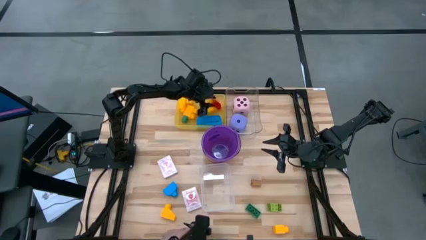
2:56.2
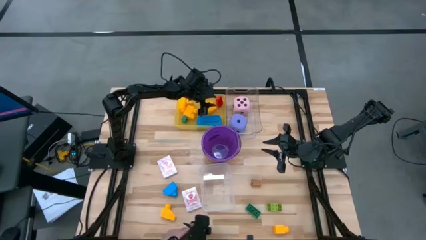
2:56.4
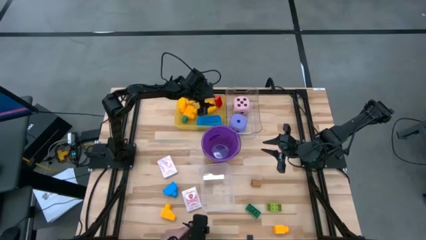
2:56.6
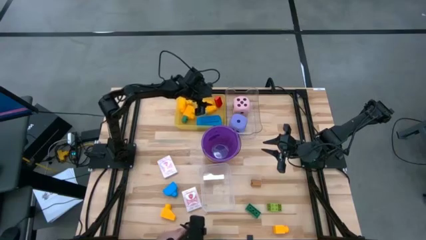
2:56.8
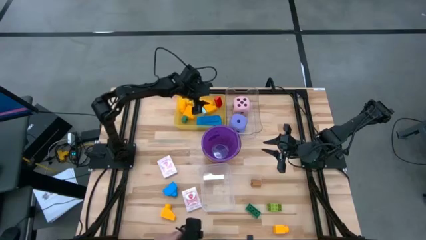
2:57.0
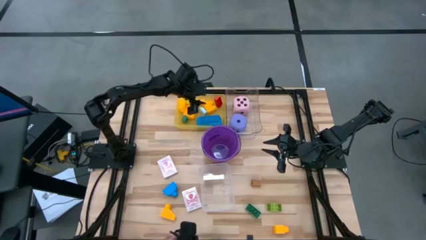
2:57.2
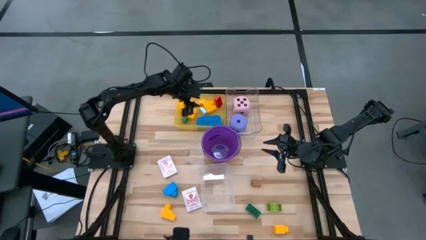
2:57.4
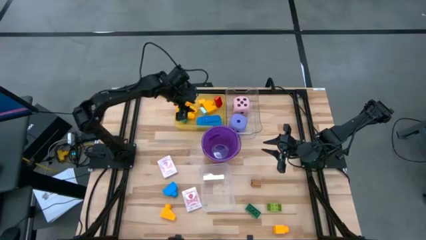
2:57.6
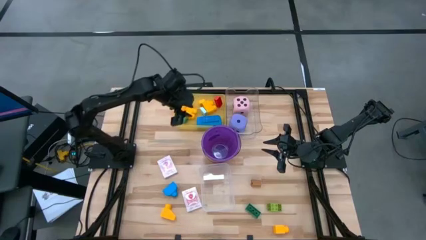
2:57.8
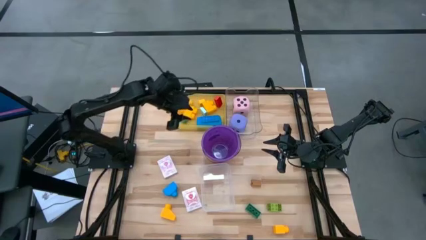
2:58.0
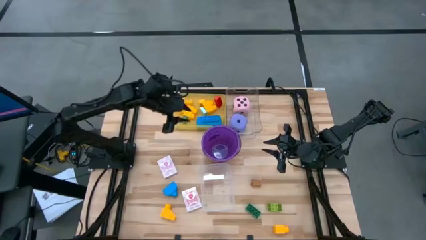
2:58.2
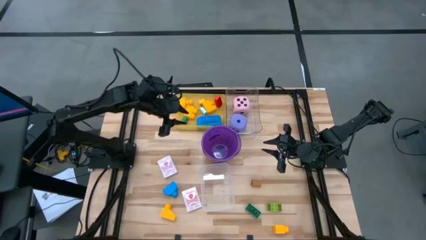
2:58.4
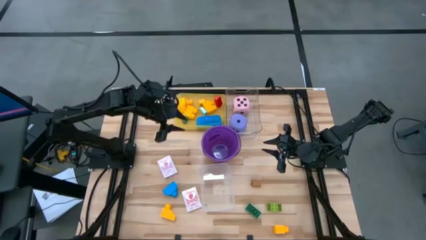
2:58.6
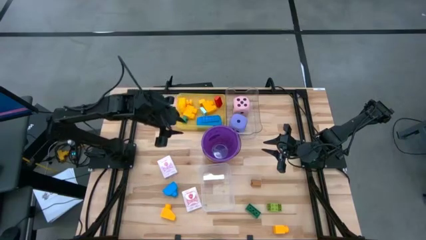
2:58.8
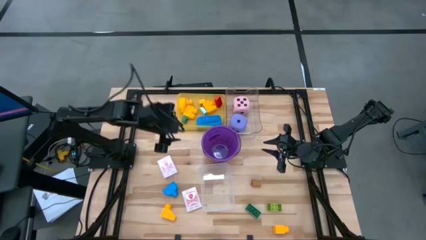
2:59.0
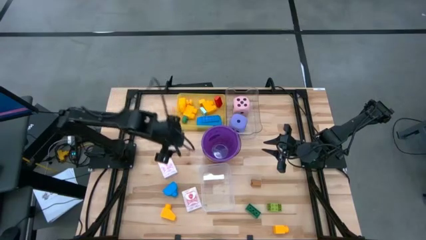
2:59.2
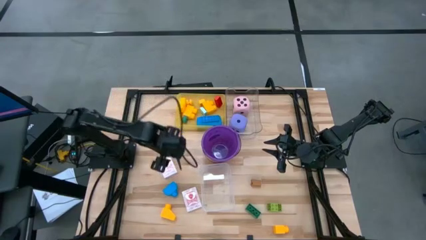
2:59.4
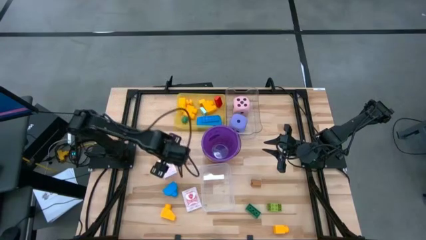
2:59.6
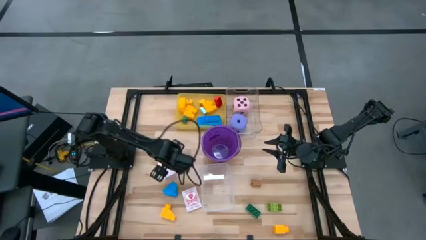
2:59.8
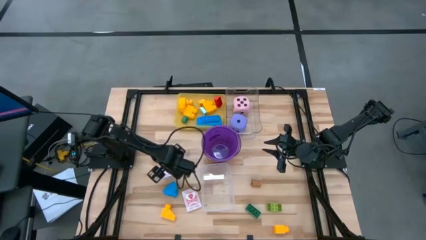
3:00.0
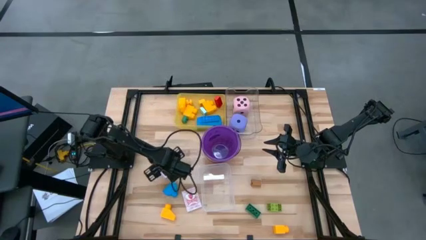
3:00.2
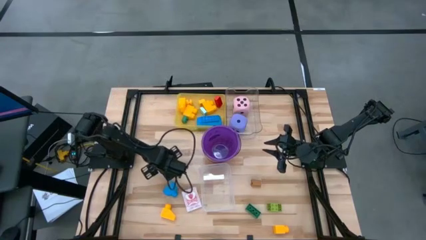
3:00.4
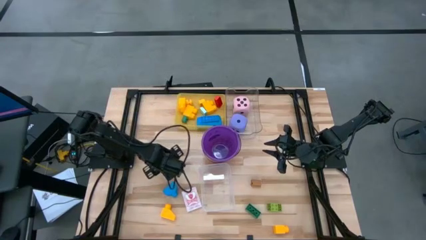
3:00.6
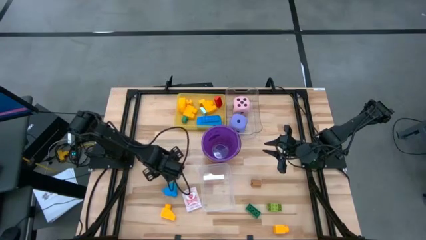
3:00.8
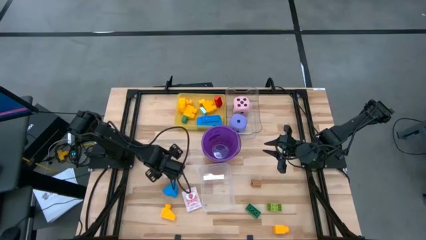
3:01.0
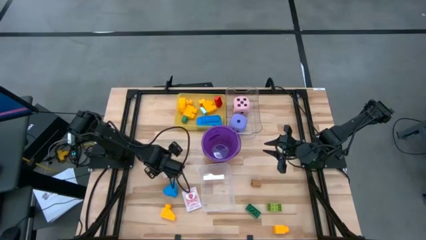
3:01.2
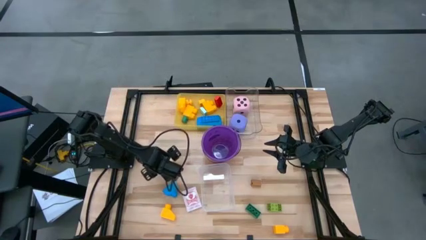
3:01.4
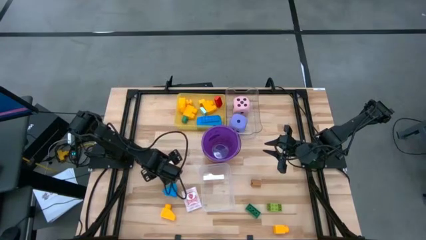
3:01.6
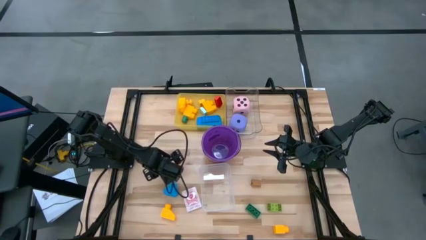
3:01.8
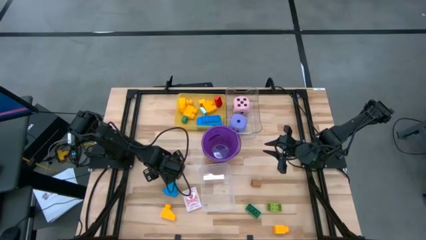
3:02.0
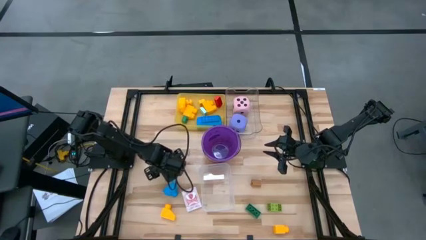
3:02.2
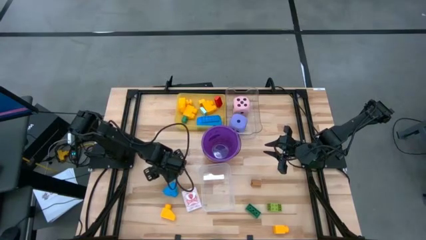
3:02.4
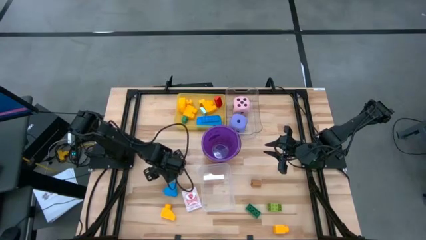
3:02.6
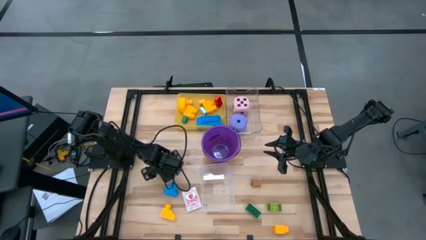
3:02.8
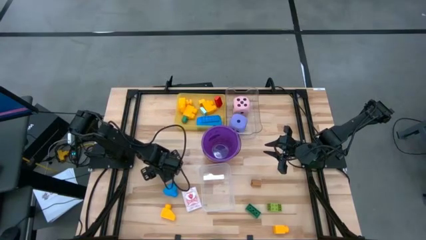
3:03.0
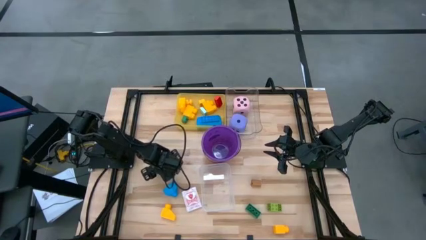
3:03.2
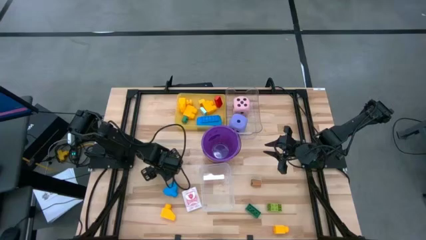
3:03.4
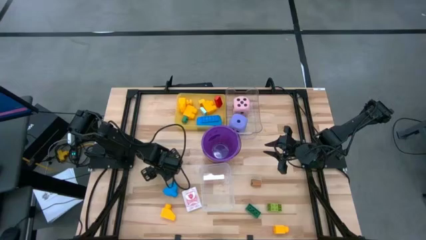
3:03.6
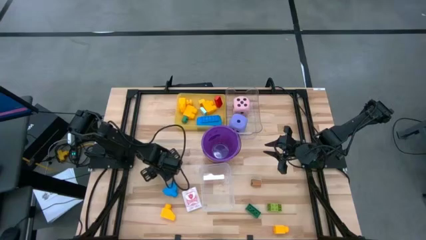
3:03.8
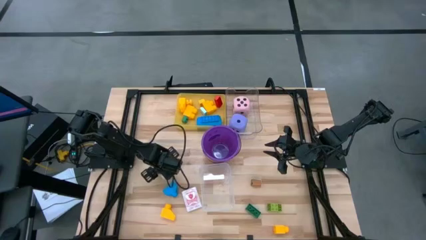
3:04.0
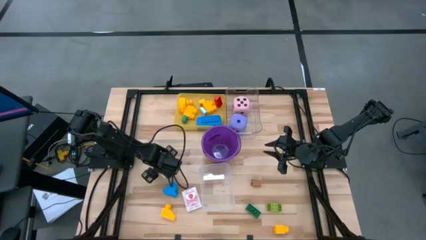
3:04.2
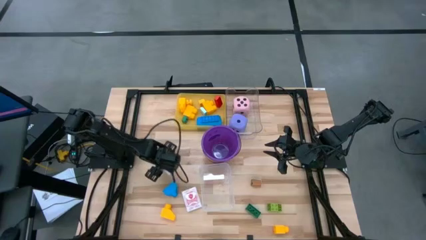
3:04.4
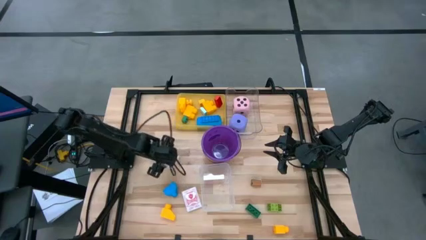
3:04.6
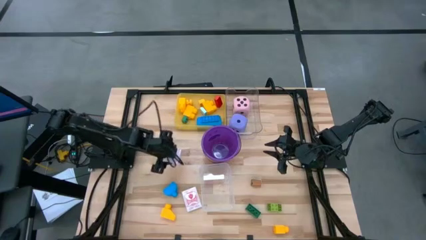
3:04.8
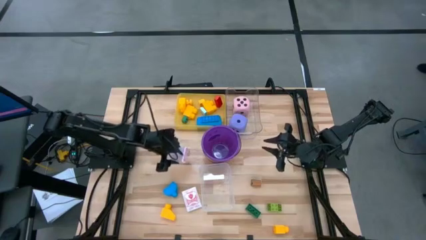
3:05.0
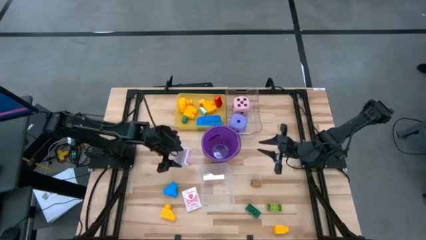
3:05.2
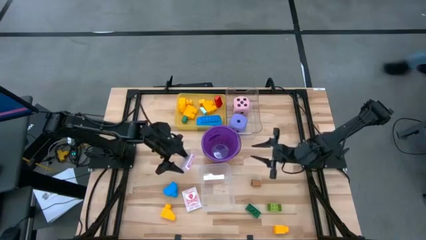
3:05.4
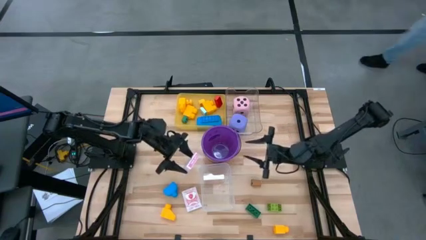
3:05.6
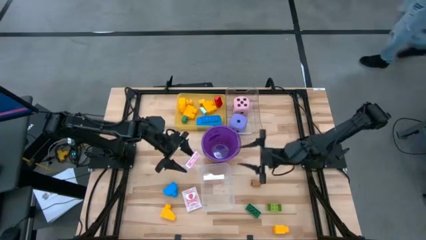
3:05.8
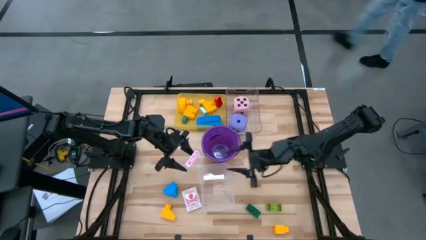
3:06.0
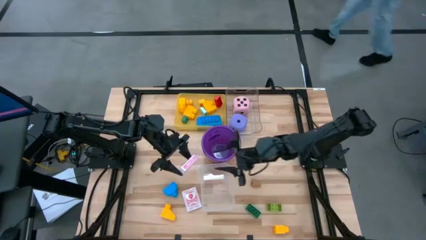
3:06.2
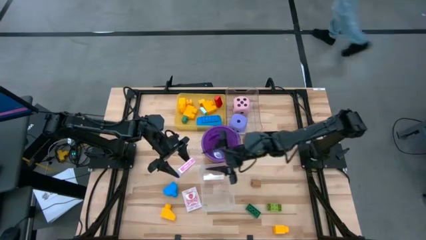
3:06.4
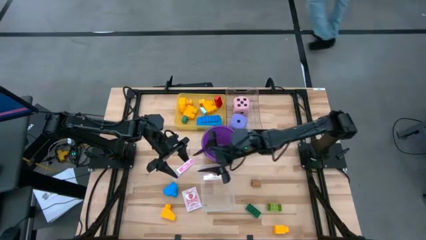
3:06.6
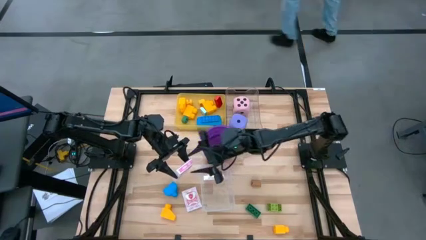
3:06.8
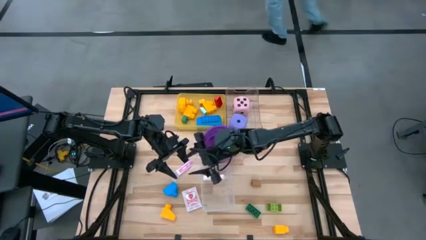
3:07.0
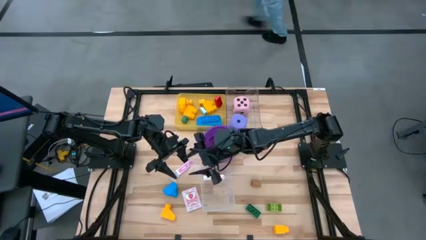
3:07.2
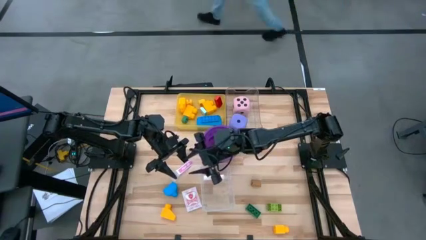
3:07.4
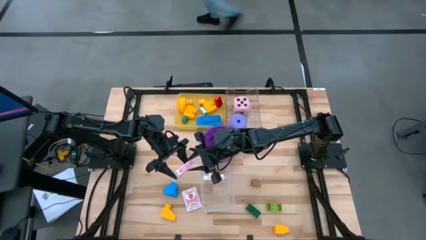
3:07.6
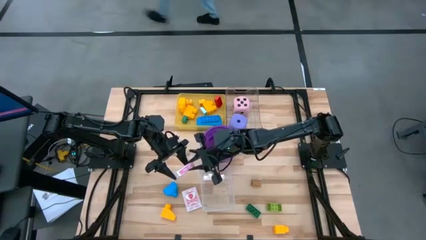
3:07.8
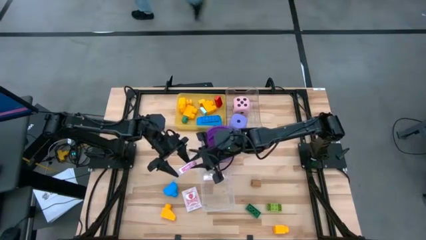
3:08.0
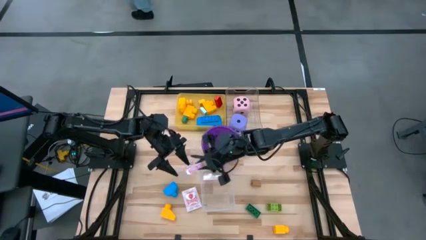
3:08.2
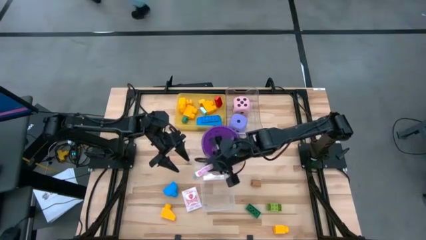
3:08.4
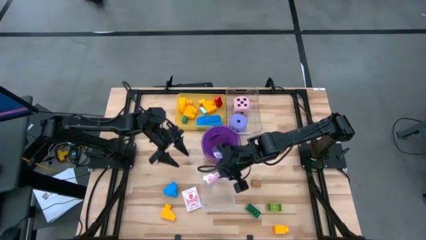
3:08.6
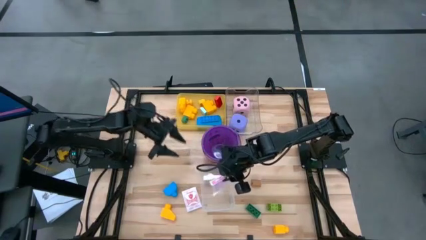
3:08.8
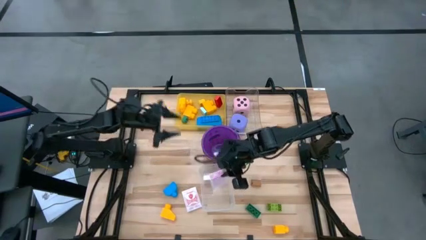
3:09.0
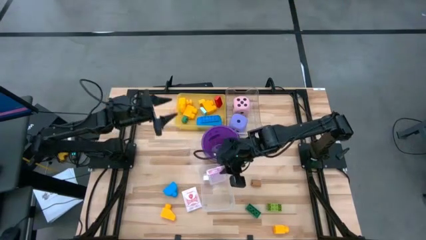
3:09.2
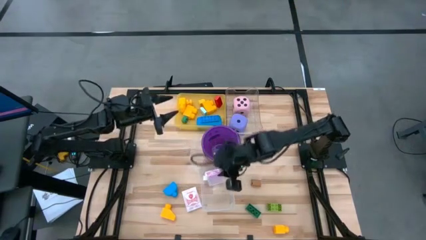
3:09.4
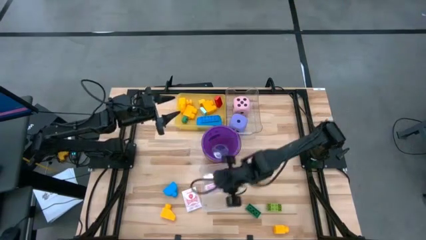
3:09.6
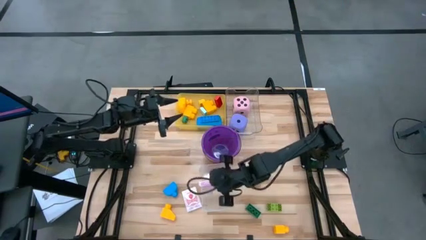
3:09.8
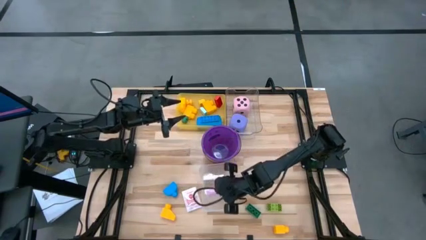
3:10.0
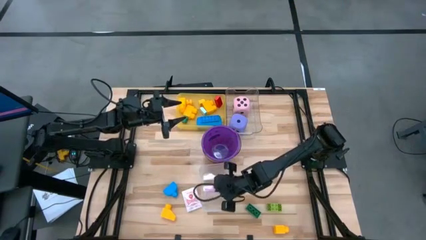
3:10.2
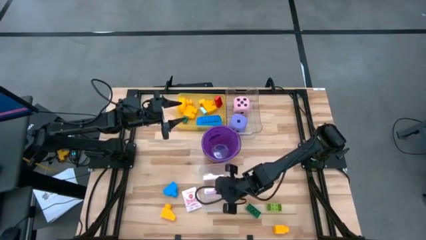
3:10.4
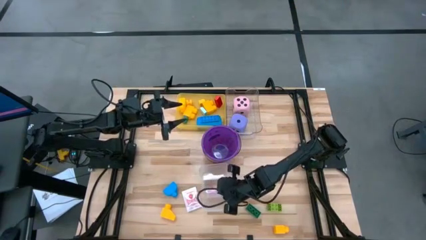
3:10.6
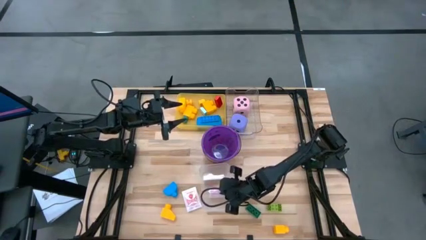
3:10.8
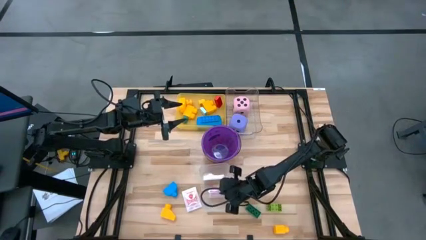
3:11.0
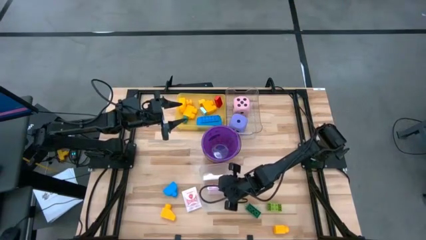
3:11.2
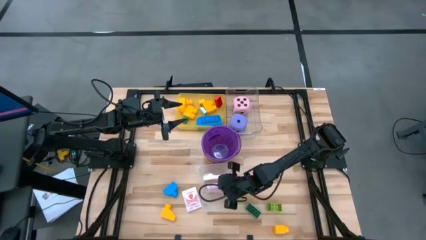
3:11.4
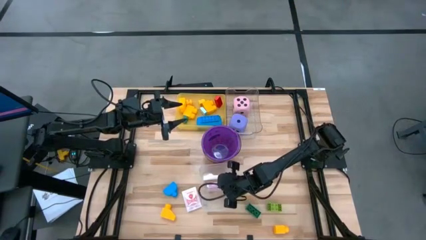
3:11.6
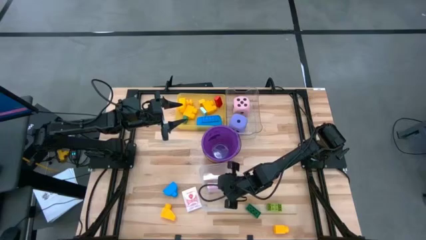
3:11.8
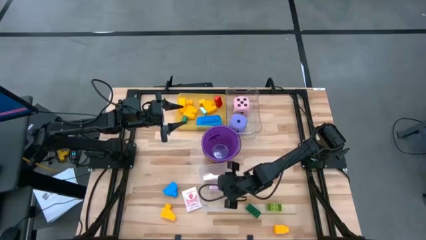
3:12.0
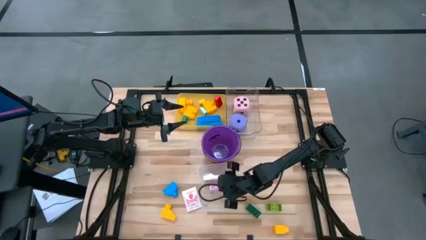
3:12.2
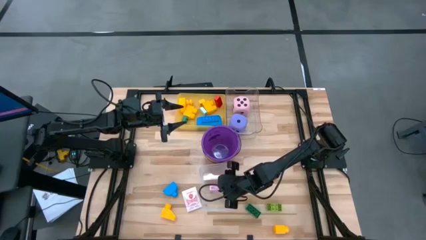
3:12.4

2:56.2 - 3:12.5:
Task: Pick & Place Toys
Put the pink deck of cards into the bottom transparent bin

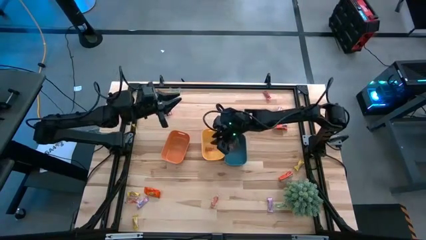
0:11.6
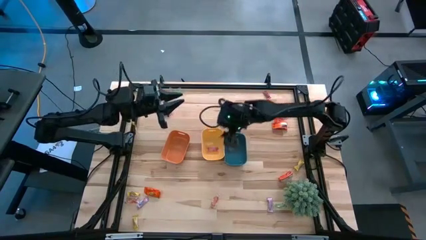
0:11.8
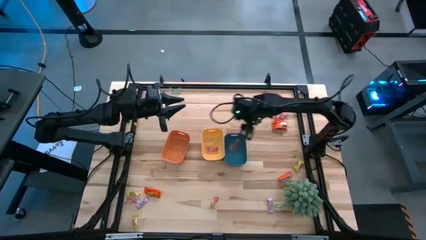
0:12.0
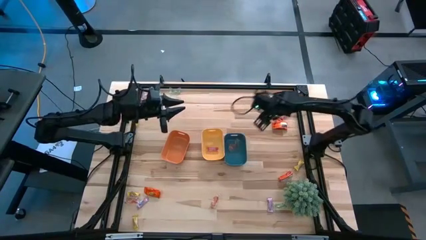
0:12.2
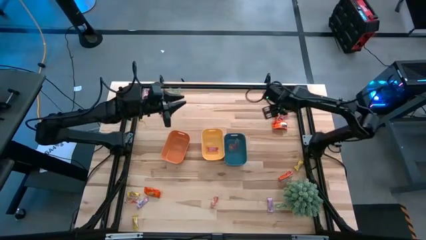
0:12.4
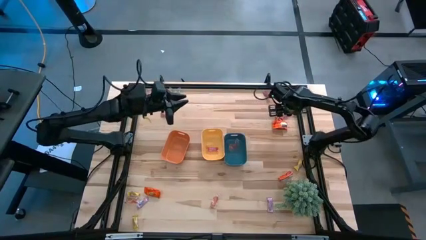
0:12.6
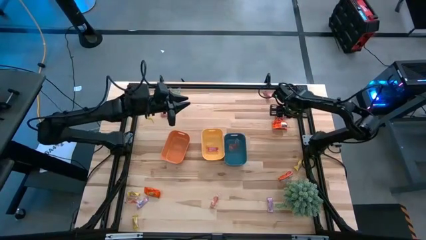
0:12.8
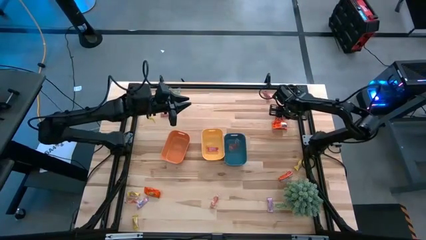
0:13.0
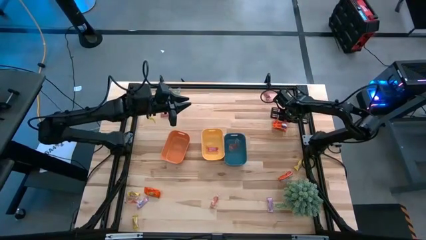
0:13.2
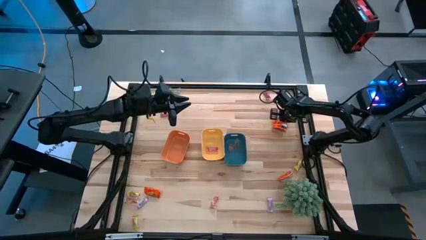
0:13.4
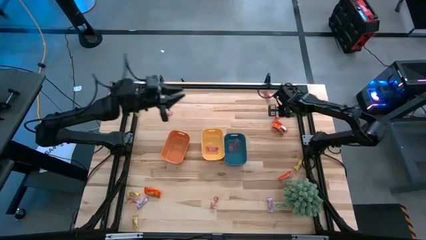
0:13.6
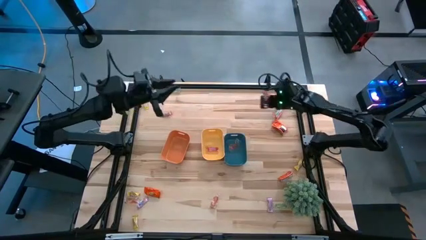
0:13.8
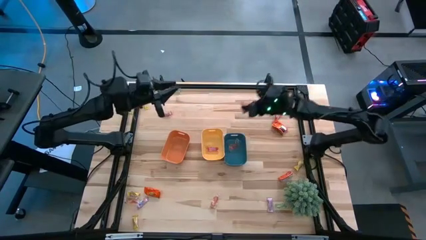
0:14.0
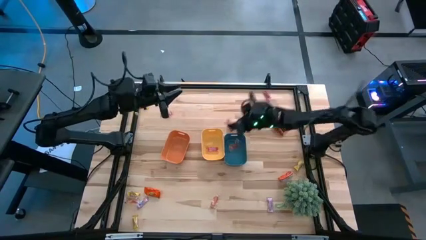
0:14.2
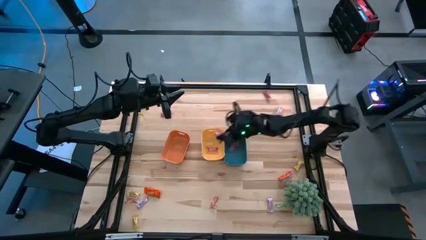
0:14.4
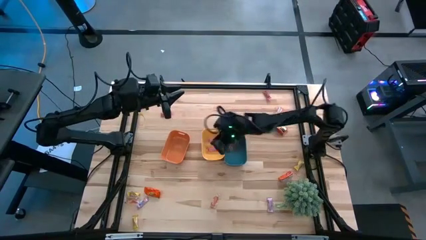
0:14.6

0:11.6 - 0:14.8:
Task: Sort candy
Put the red candy into the yellow bin
